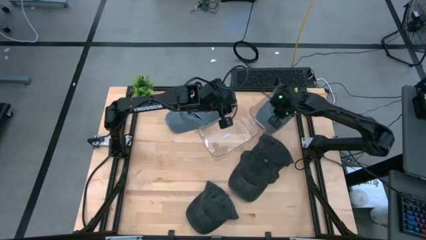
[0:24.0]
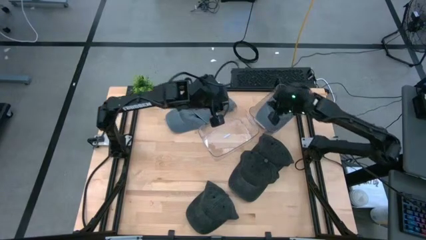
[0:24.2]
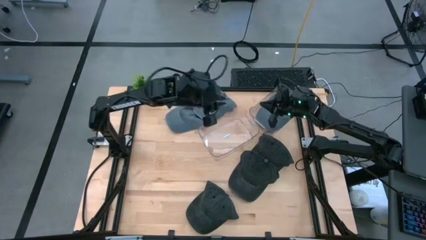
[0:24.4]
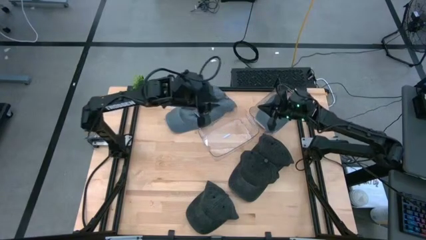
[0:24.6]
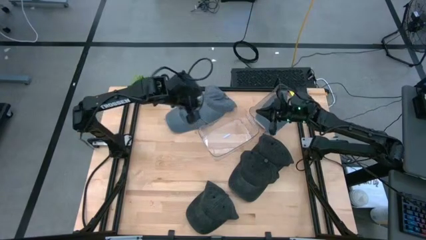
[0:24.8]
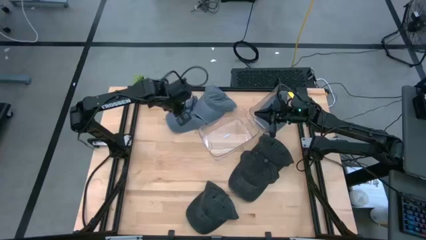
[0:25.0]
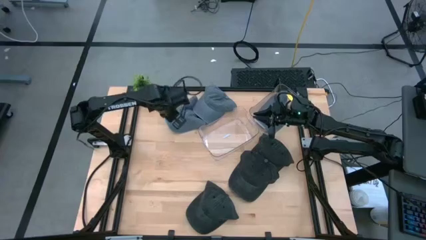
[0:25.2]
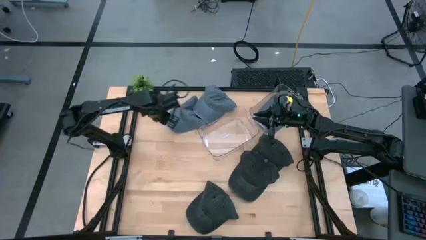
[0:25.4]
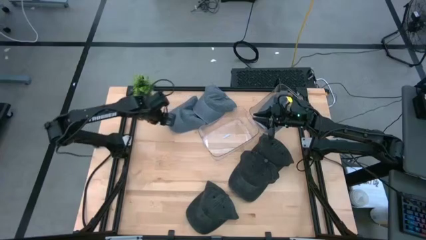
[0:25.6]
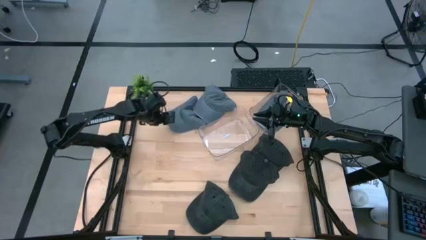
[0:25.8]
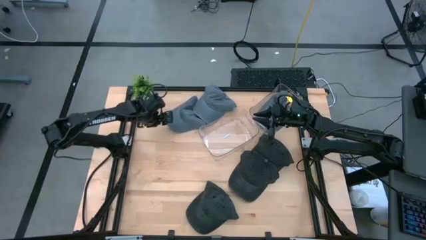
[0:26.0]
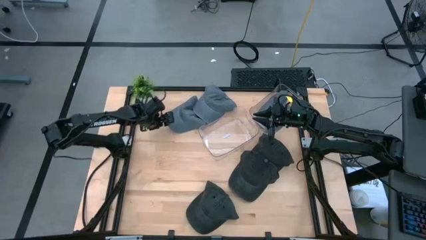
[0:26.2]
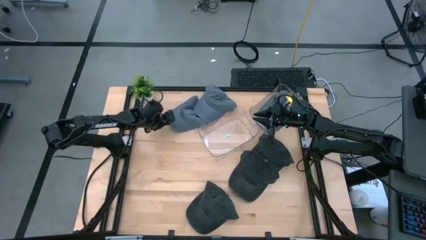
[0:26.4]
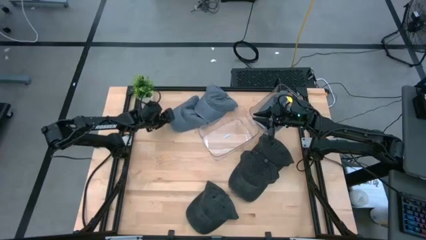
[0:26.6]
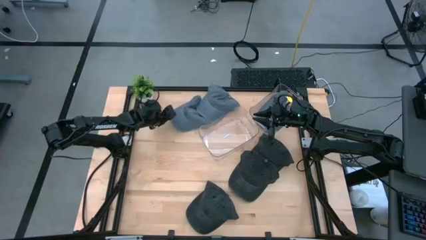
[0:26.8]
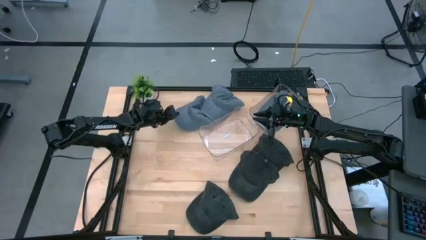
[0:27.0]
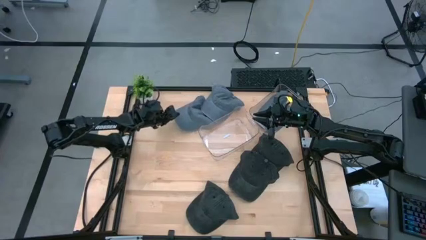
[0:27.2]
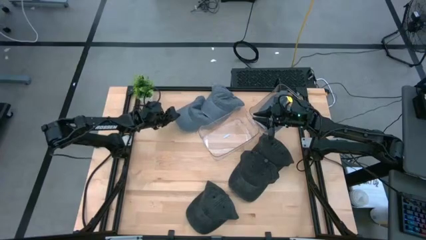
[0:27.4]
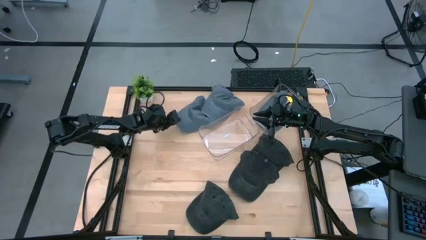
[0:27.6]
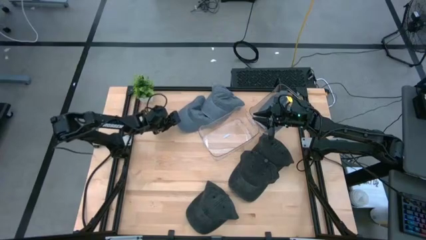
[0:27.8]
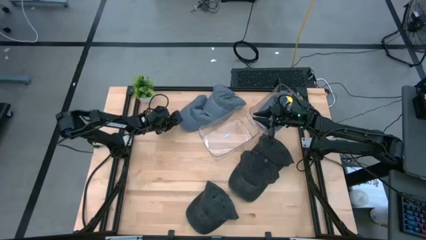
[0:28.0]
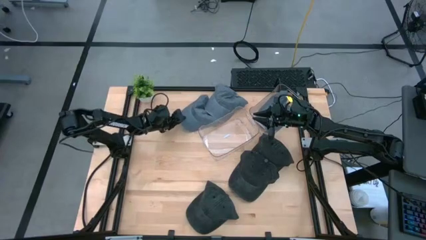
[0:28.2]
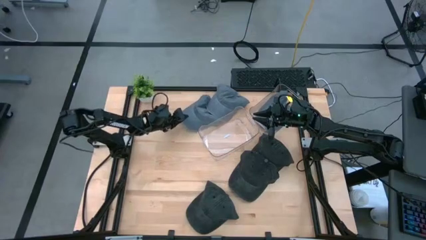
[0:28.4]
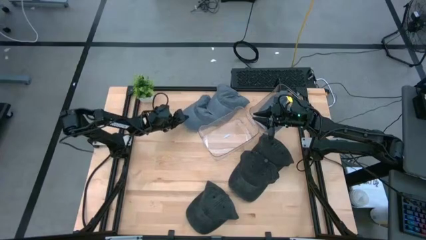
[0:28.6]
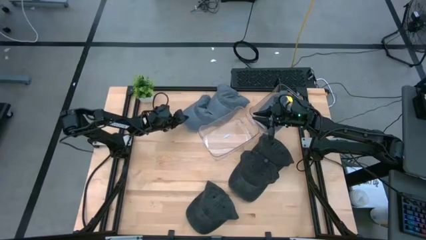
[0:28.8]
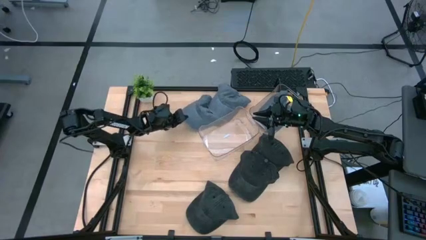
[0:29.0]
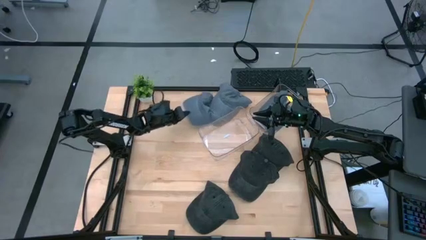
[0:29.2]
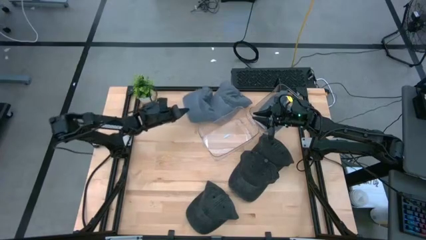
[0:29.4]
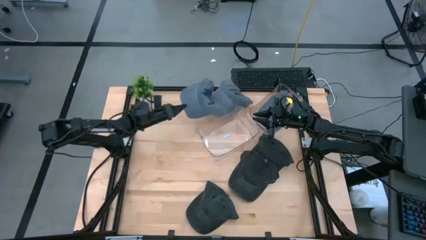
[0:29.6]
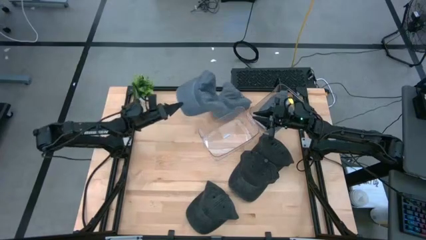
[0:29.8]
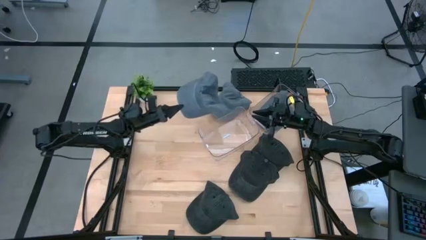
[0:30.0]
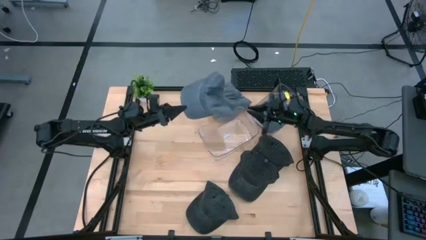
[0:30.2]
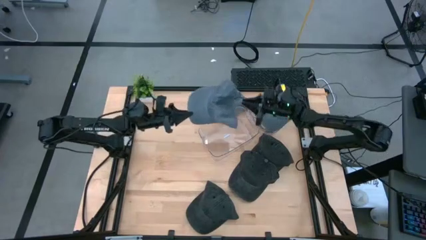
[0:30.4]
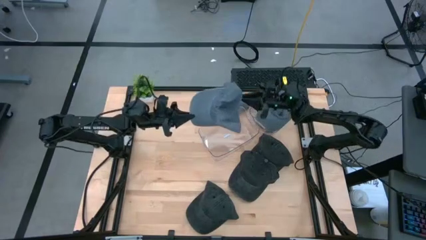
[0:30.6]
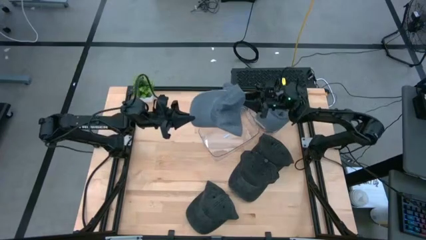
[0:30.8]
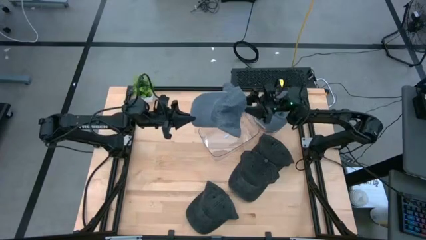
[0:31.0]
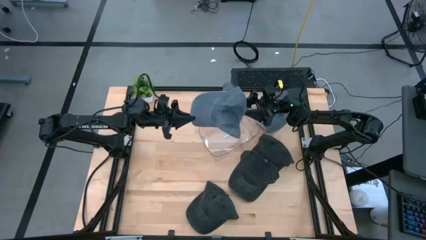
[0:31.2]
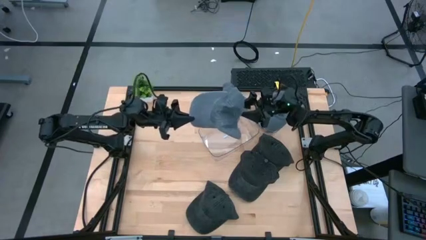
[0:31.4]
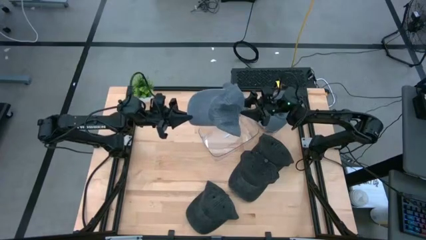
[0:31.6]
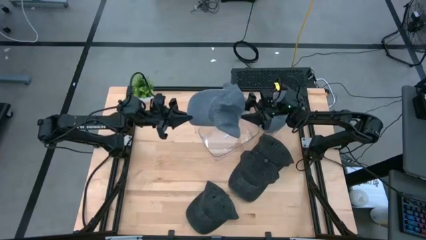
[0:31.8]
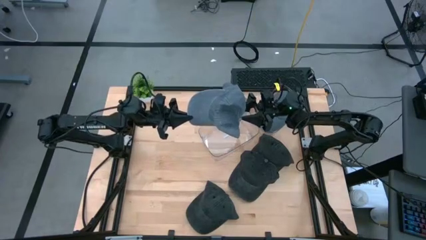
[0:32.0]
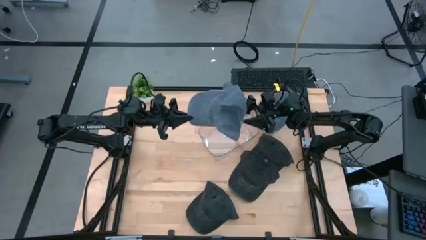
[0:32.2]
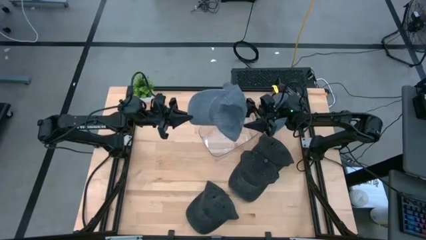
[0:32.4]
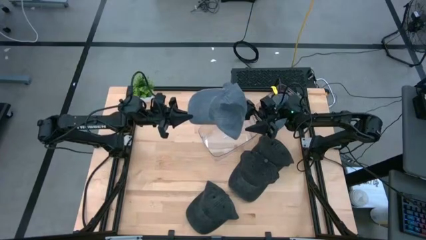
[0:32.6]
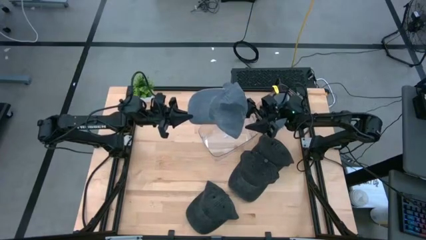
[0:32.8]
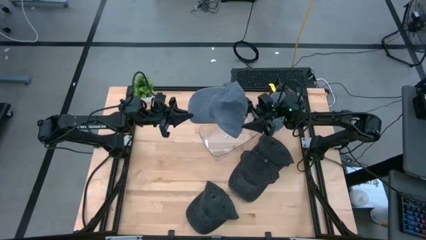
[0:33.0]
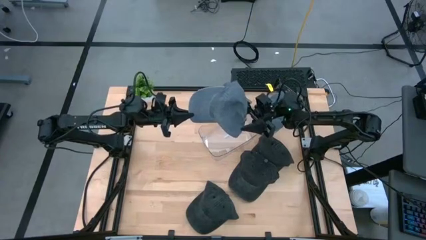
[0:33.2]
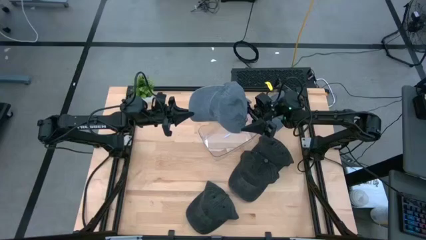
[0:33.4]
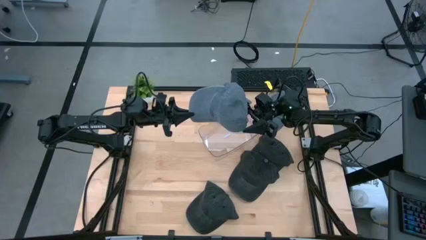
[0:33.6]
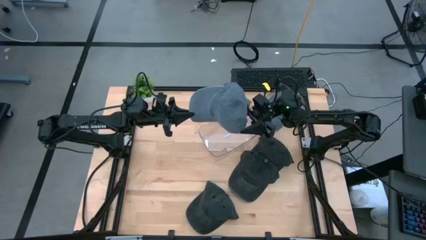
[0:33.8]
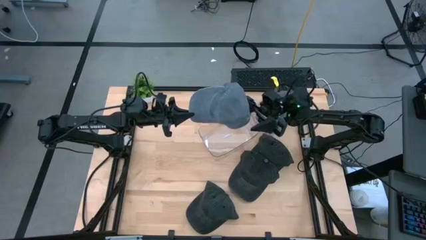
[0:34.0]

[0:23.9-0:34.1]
Task: Pick & Place hat
Stack the left gray cap on top of the gray cap in the right transparent bin

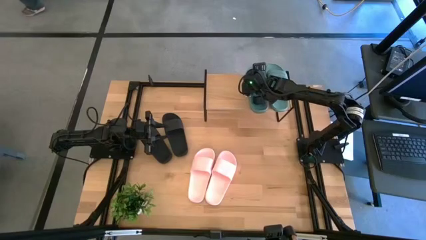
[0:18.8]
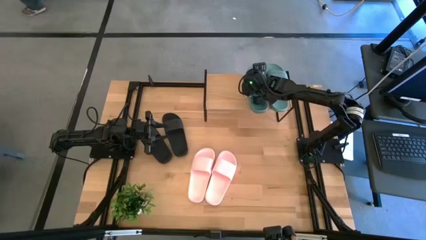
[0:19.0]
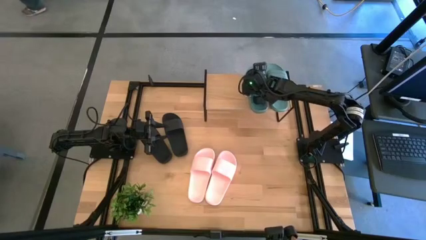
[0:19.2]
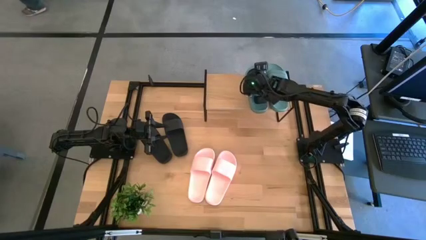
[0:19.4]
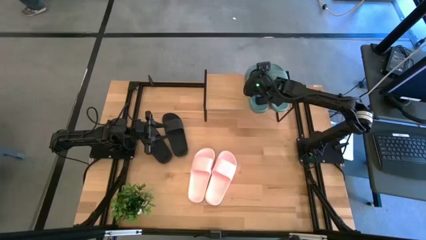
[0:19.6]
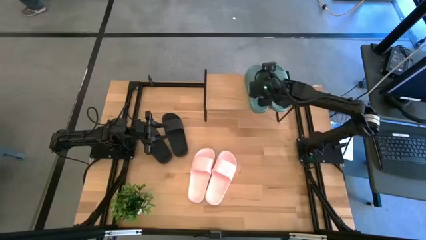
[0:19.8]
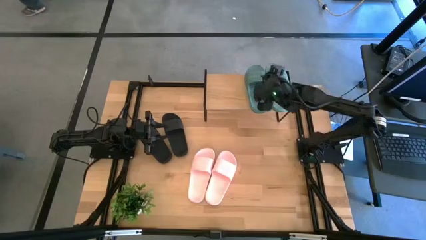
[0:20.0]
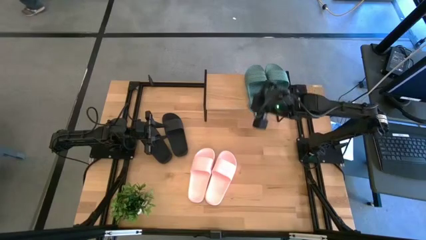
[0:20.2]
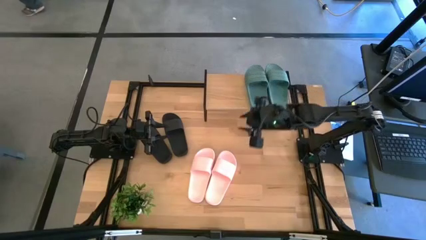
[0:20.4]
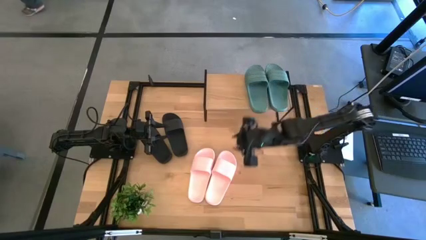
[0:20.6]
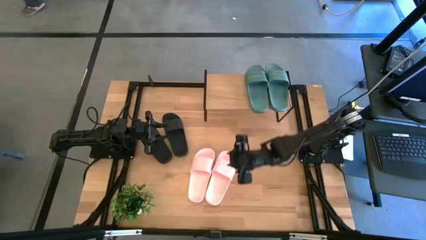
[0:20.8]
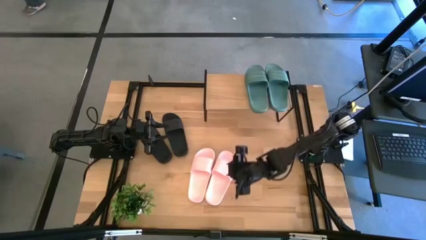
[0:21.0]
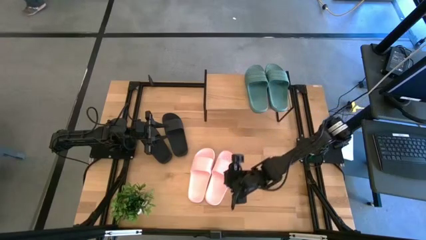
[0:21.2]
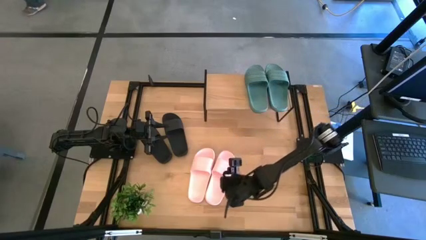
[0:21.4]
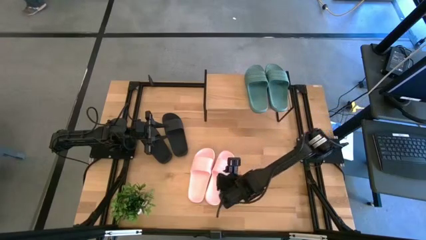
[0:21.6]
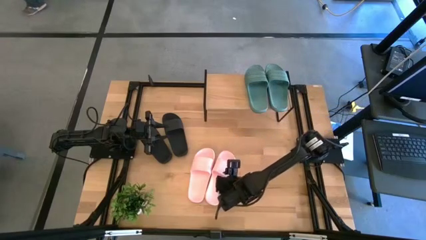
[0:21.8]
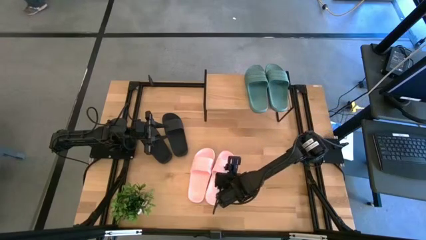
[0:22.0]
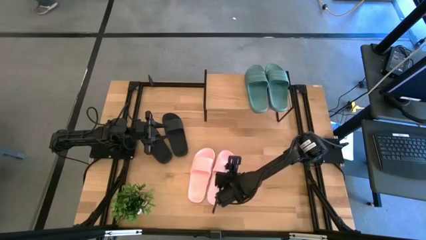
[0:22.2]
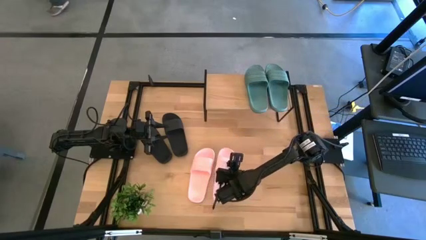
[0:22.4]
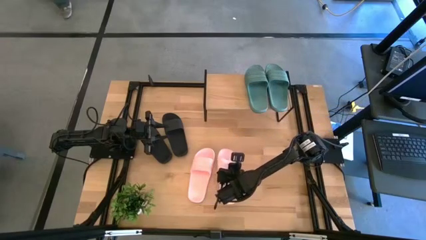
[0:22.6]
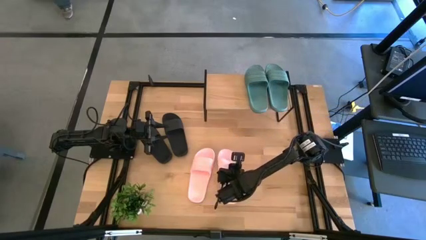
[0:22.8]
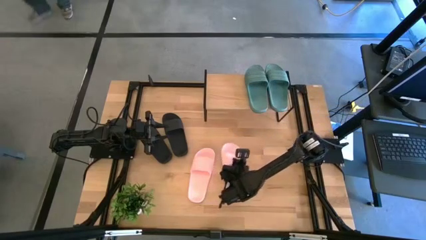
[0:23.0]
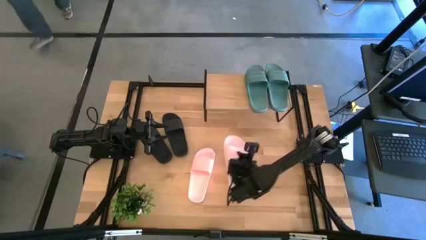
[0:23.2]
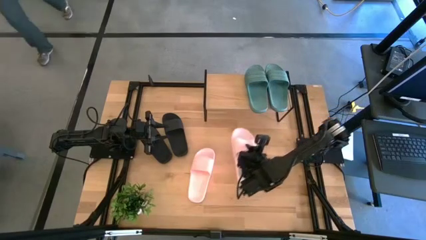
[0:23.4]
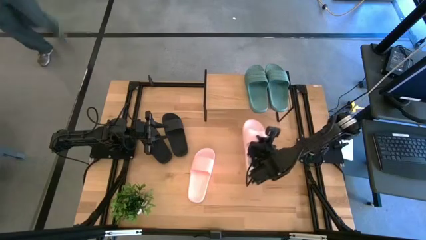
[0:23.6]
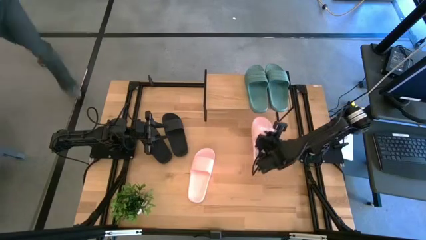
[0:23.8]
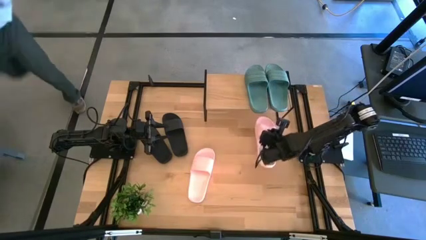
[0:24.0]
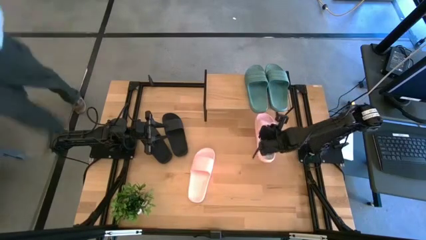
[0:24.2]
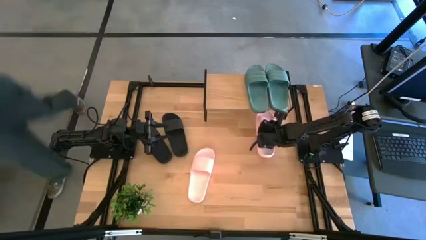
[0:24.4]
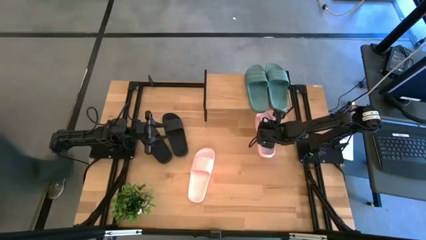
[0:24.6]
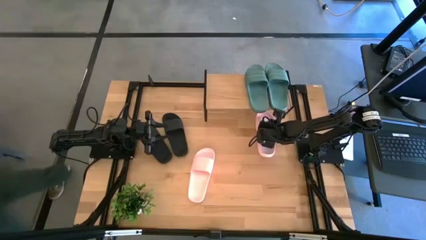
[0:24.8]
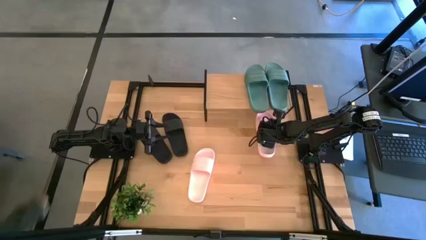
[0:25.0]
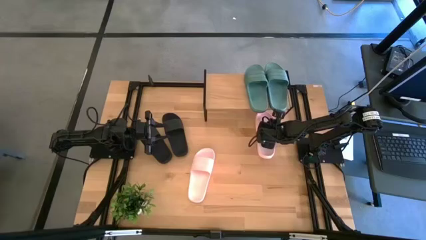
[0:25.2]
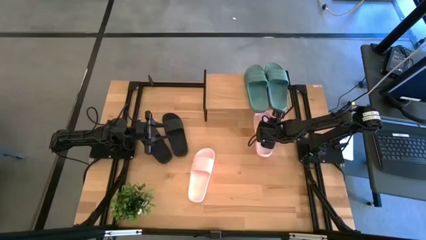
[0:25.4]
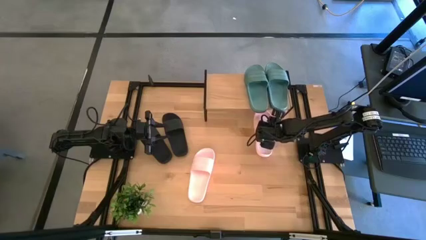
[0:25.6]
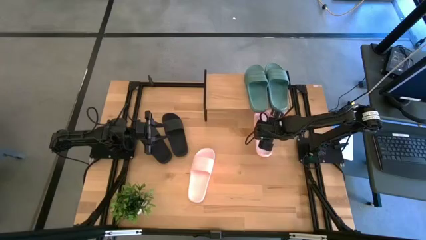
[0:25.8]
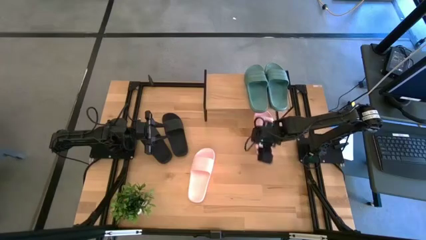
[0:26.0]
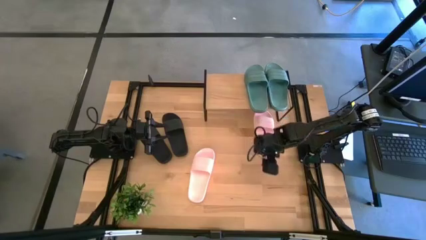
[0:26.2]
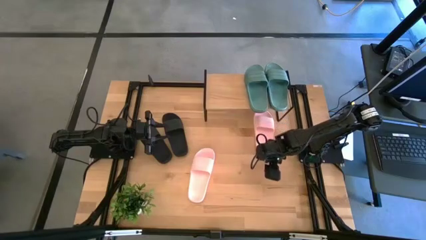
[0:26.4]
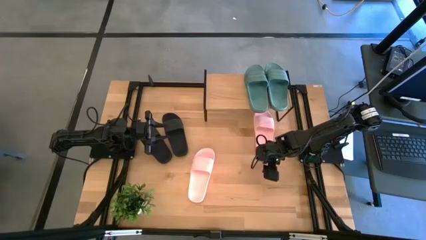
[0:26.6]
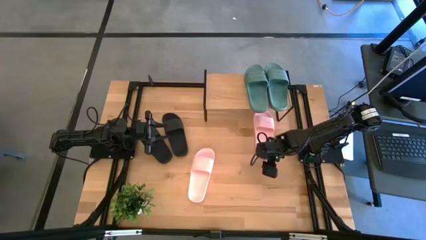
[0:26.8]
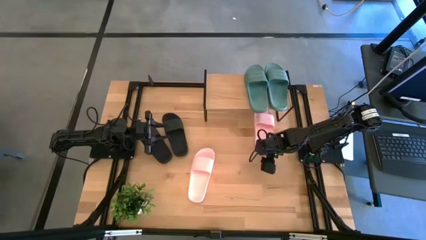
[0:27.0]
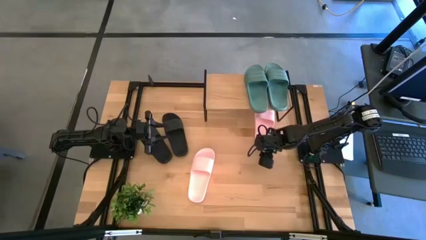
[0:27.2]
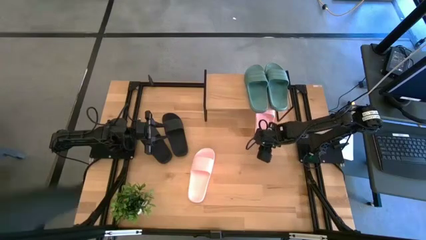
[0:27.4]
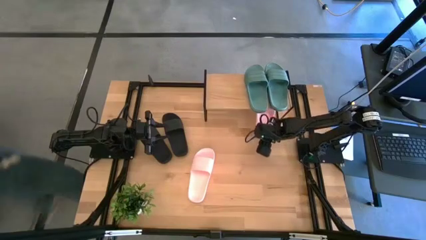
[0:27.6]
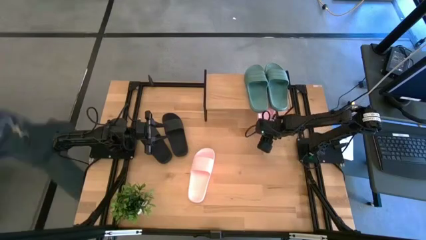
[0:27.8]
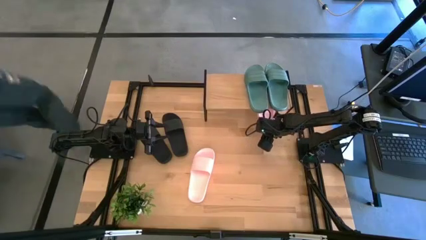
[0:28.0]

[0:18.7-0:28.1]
Task: Pick and place slides into the shelf
Put the right pink slide under the shelf
